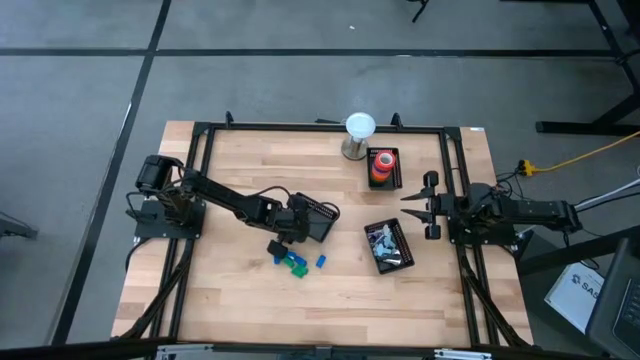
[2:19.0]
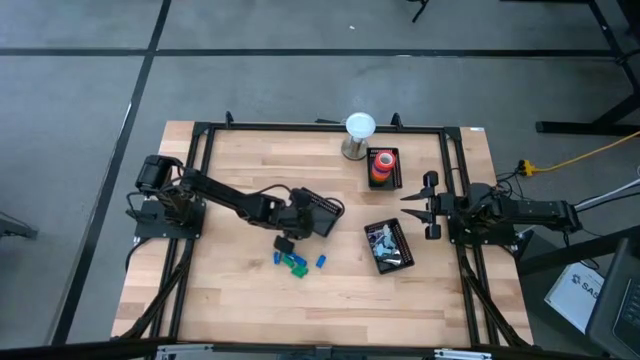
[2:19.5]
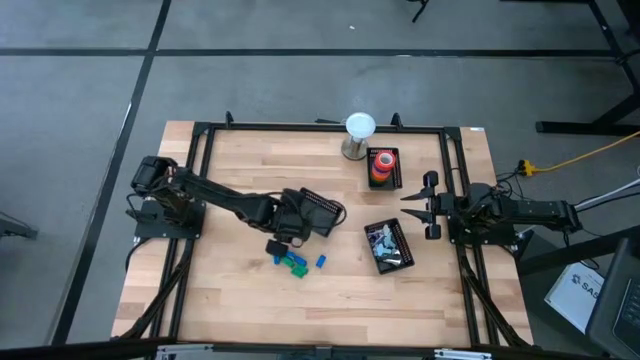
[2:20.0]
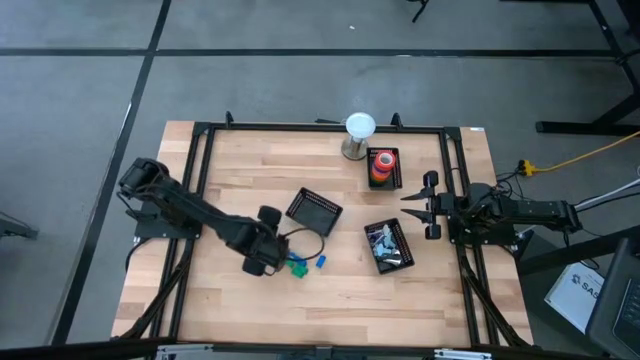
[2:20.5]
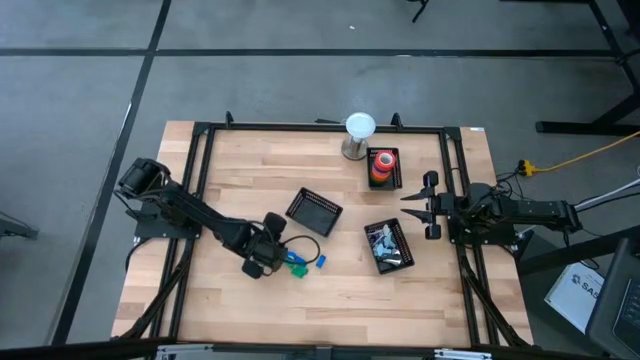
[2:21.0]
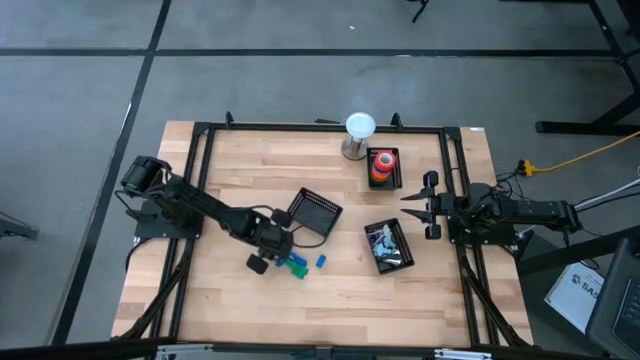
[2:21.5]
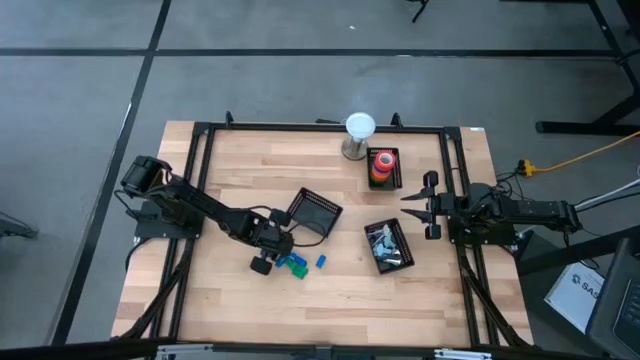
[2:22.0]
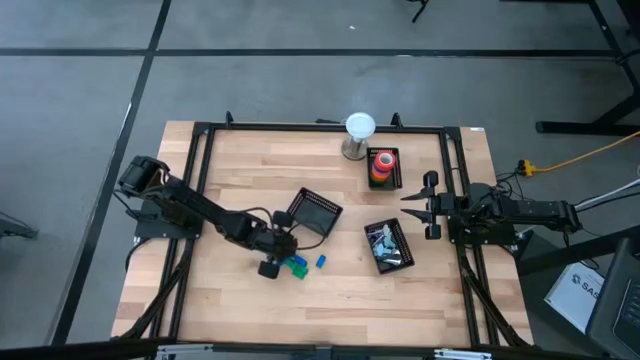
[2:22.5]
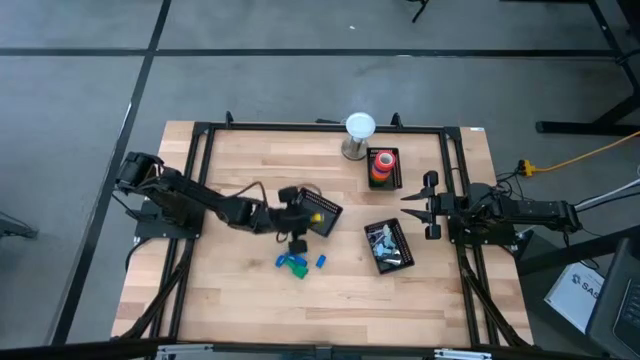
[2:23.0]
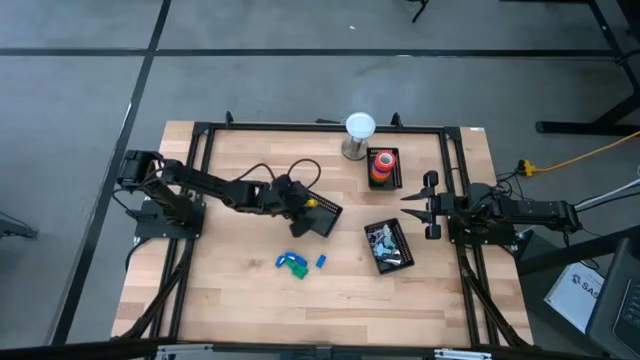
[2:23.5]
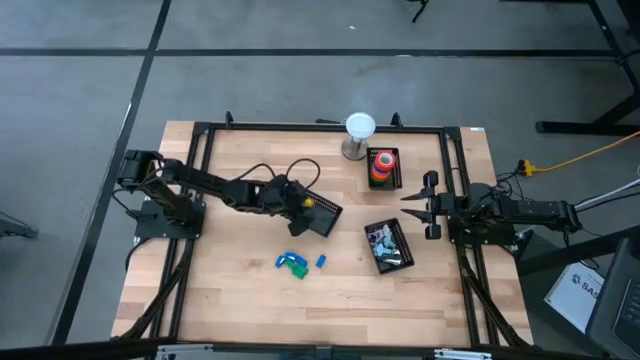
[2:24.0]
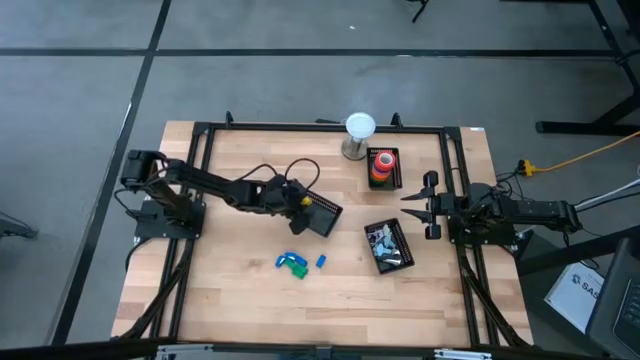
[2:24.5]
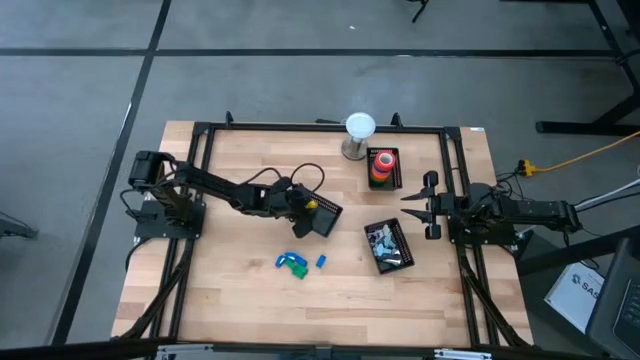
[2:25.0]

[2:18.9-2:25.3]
Task: Pick and place Stapler, Stapler remover, tape
Put the yellow stapler into the center black bin

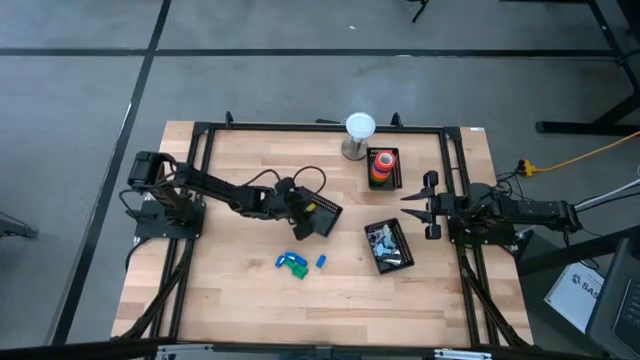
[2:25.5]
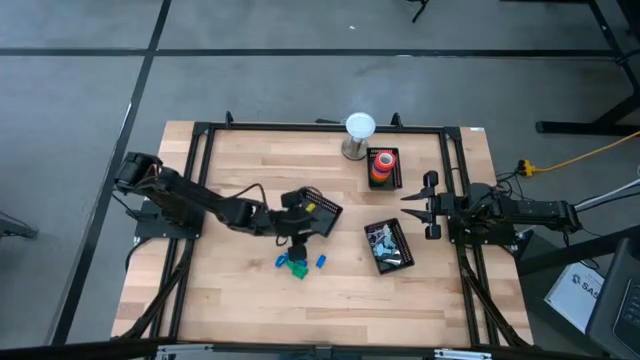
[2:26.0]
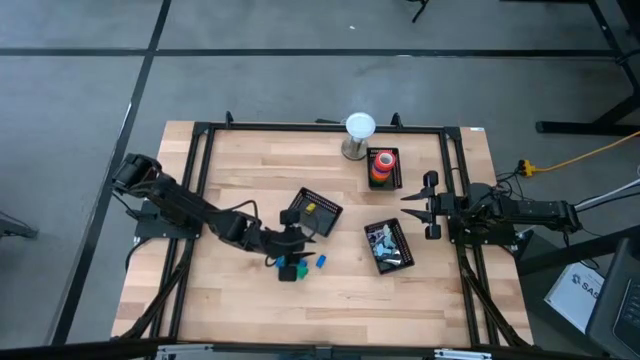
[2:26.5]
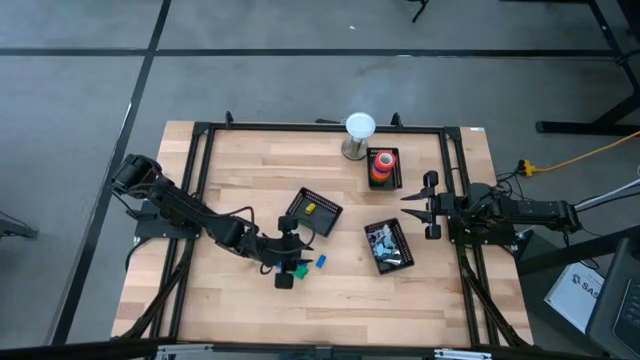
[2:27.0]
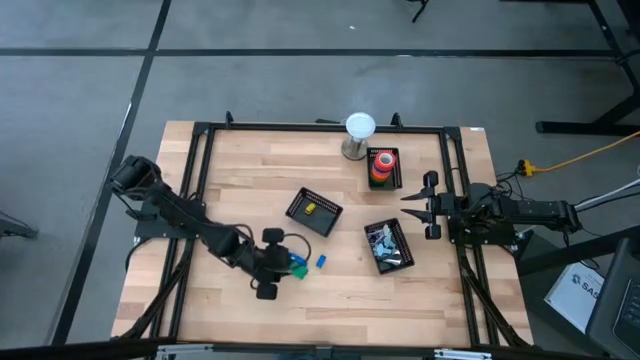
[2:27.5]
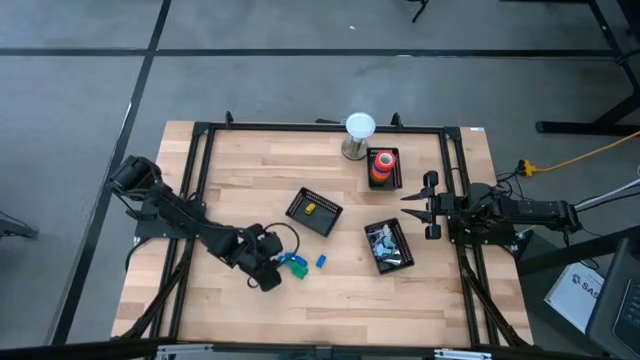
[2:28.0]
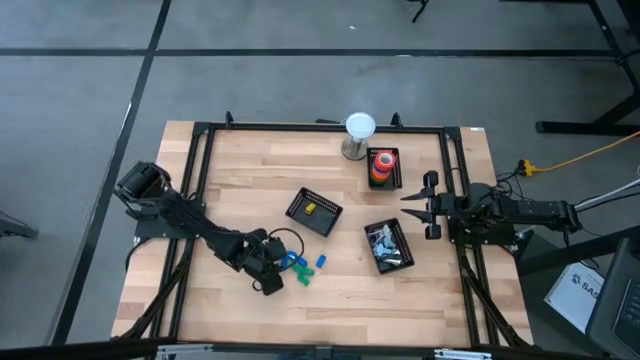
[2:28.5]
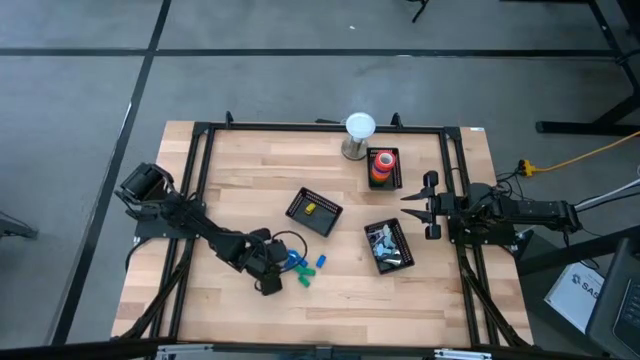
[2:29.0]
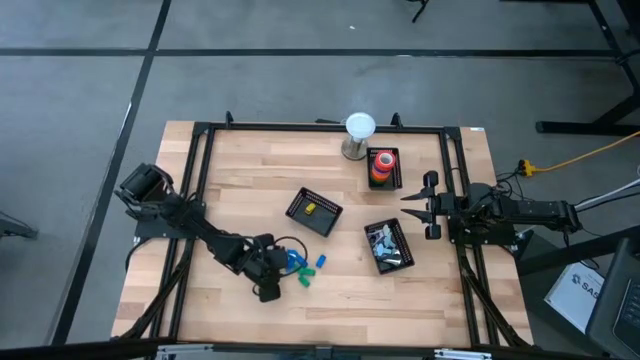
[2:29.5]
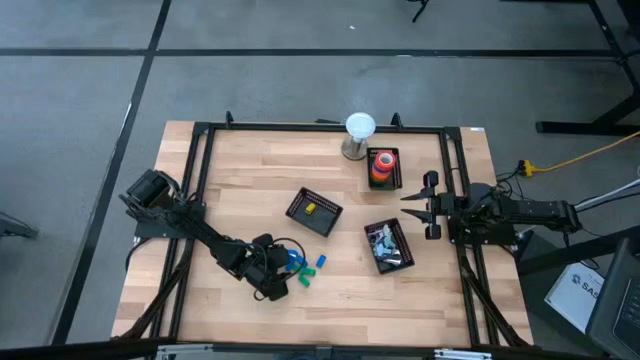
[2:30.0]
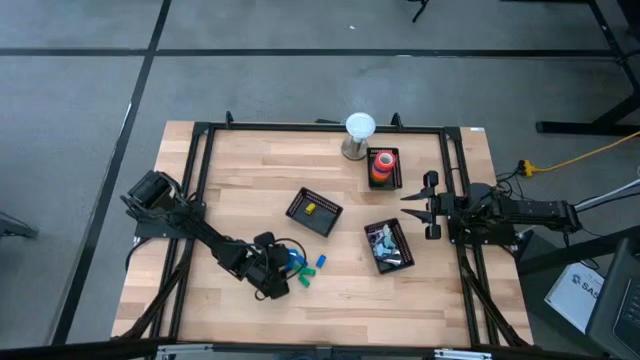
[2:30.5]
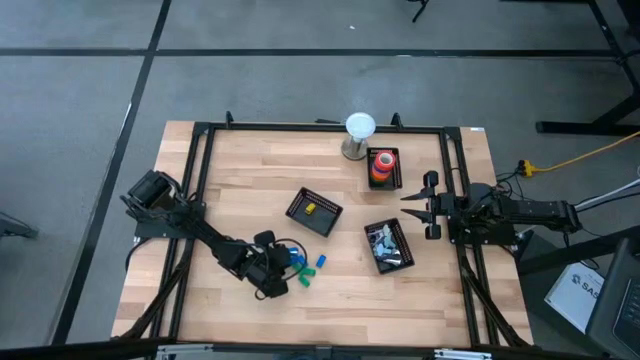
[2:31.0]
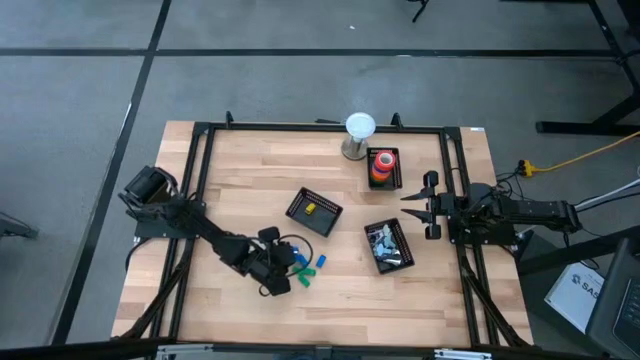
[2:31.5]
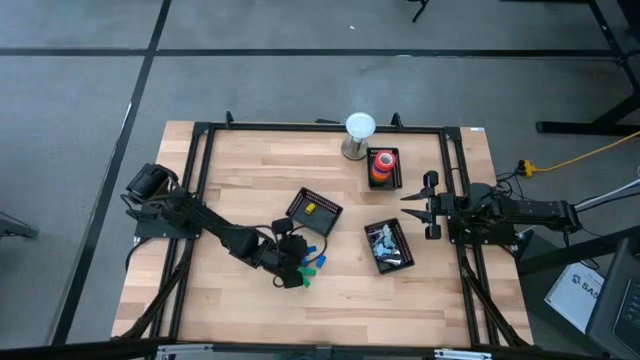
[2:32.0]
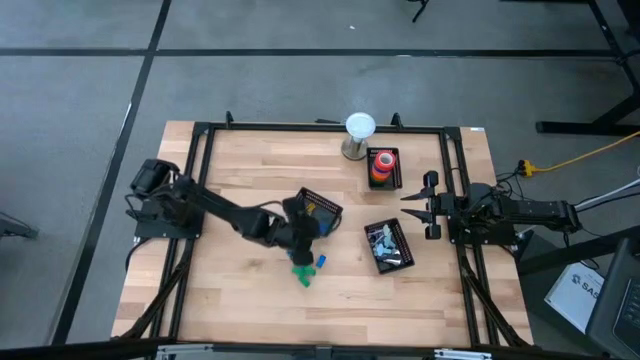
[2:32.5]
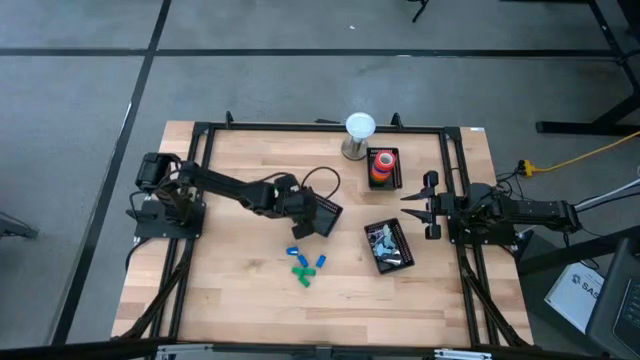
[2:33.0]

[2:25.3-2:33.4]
Put the blue stapler into the center black bin

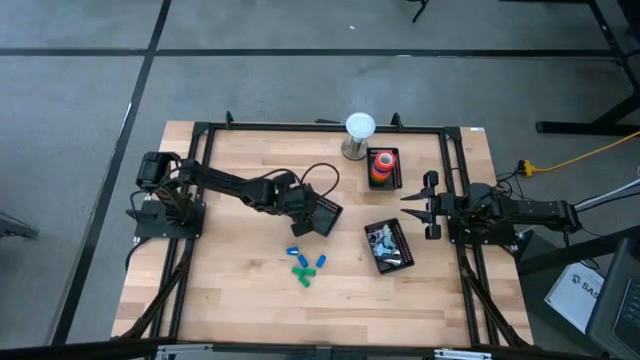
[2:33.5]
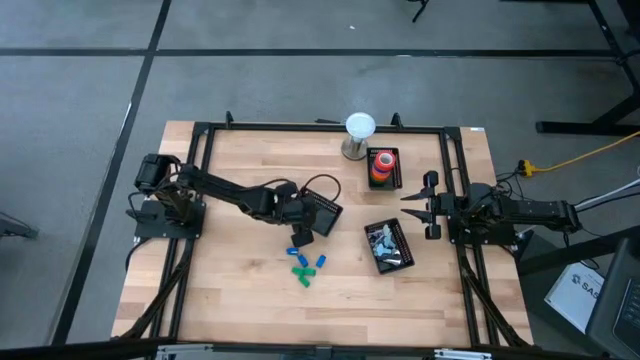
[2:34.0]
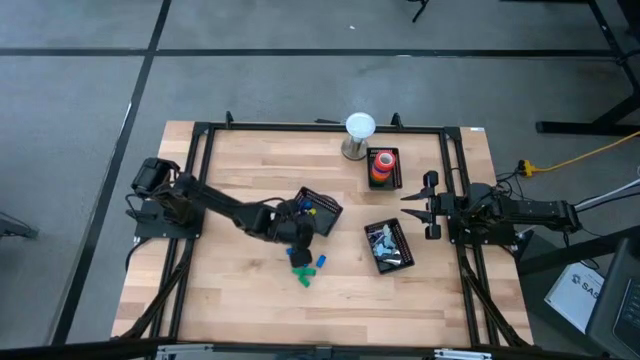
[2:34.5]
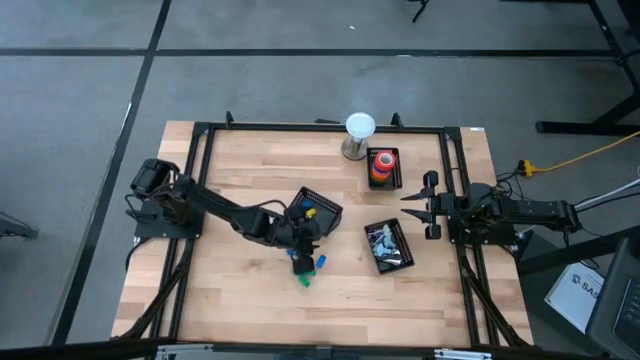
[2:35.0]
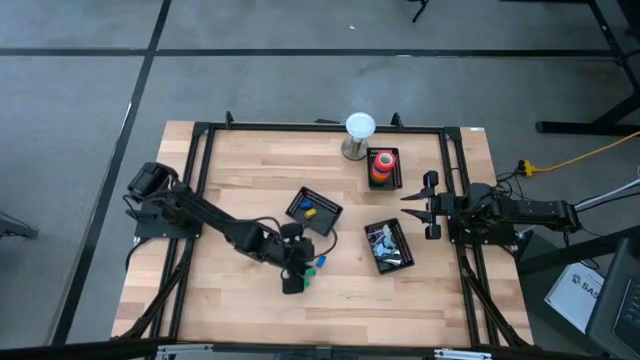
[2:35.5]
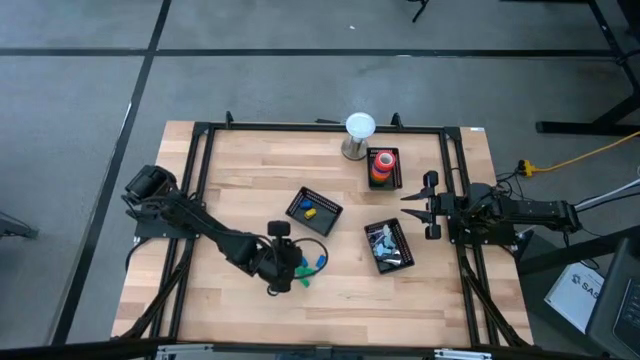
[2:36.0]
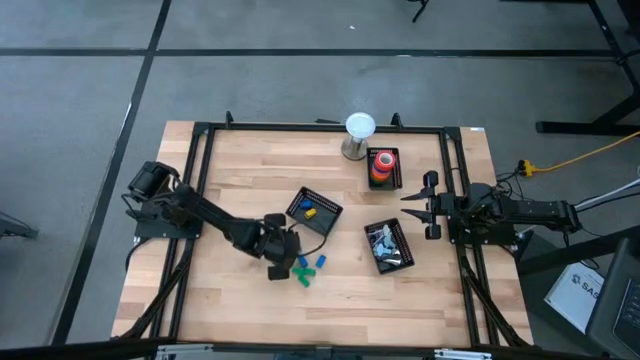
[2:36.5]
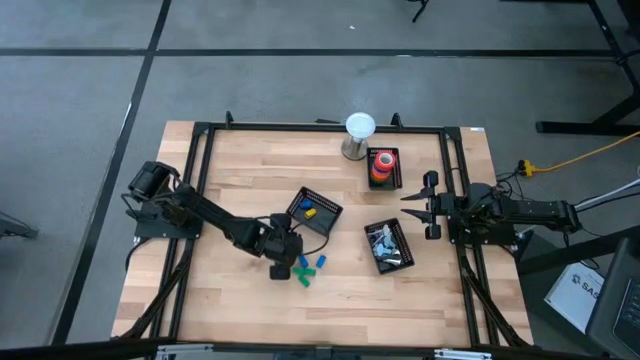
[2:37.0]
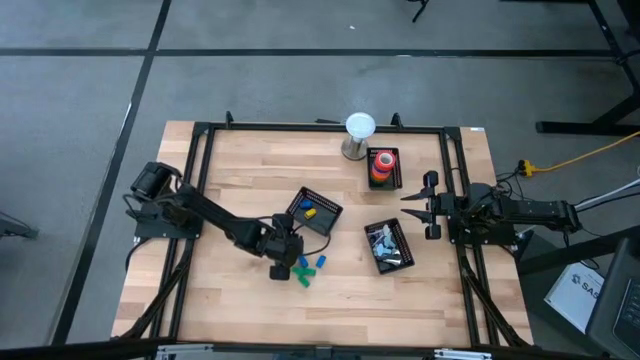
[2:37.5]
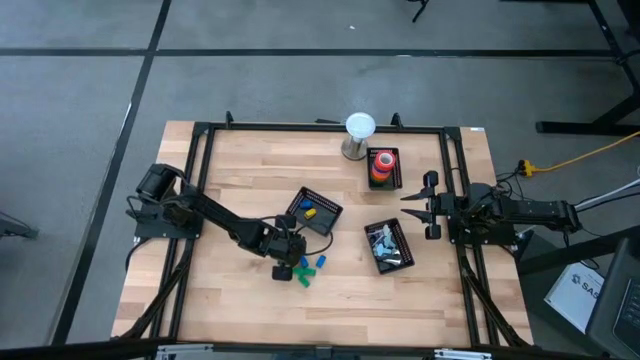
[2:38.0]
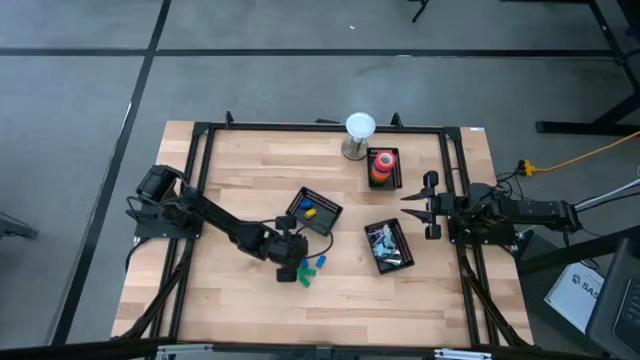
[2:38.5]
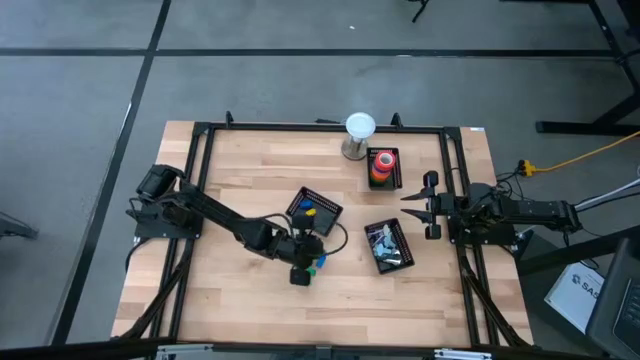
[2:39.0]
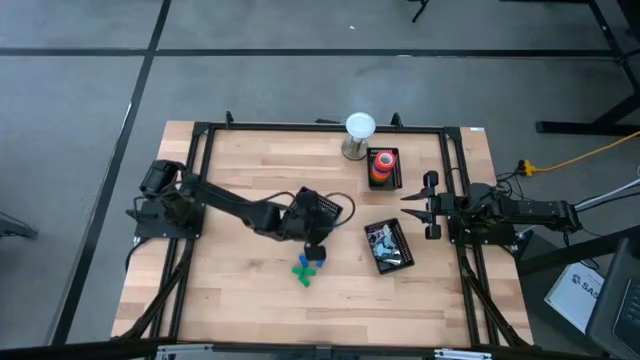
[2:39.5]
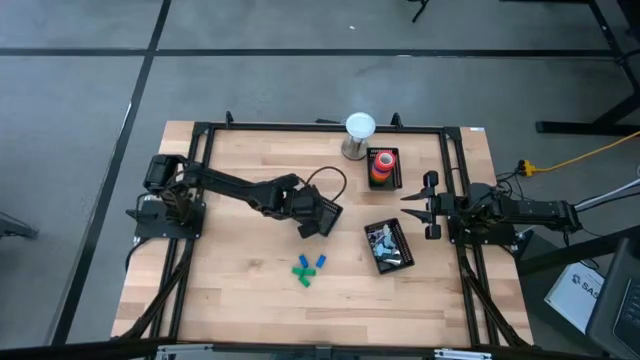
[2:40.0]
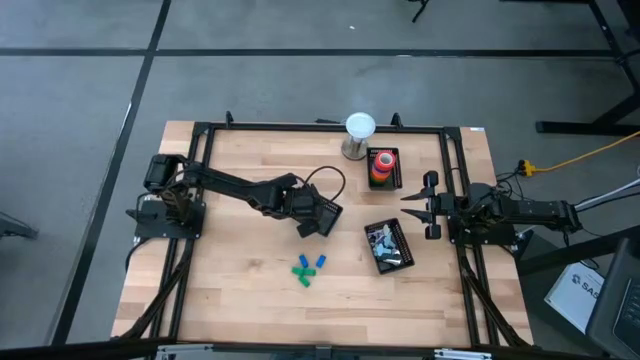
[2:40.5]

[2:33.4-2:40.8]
Put the blue stapler into the center black bin
